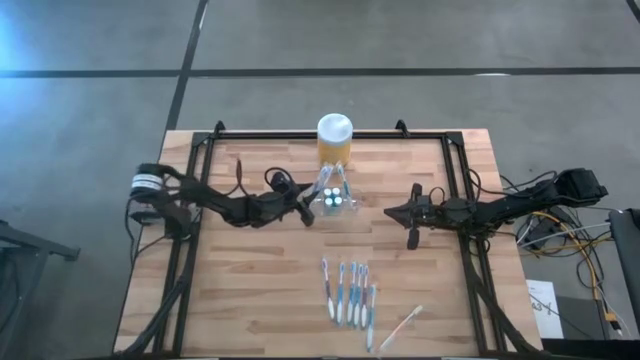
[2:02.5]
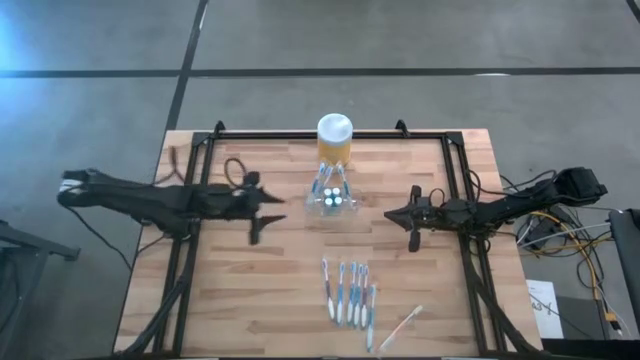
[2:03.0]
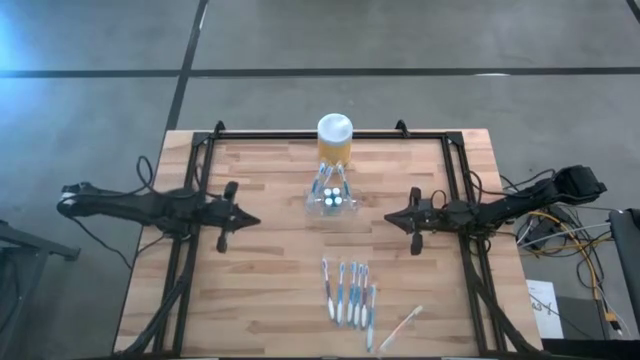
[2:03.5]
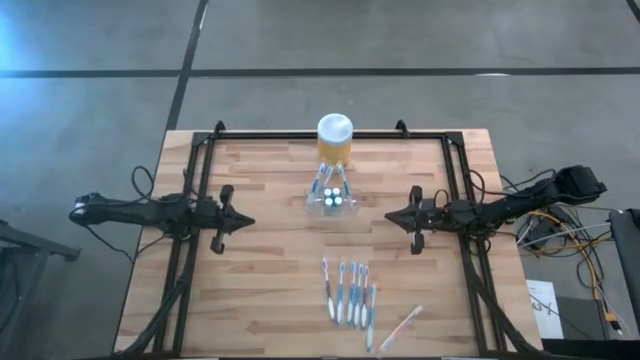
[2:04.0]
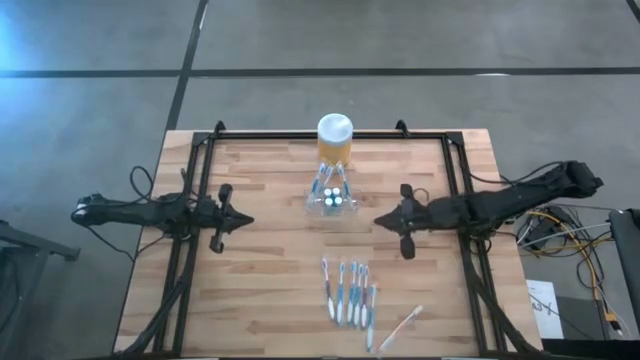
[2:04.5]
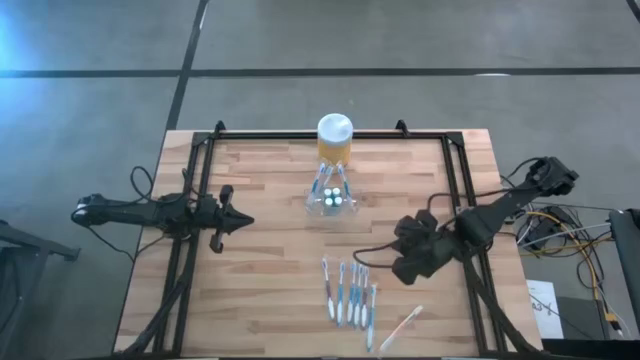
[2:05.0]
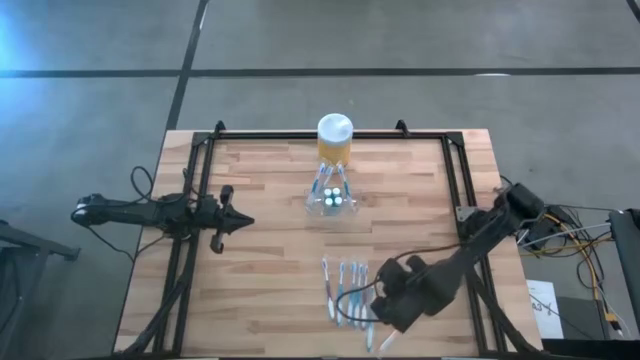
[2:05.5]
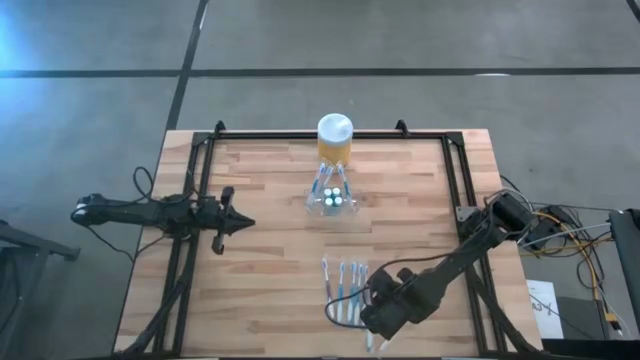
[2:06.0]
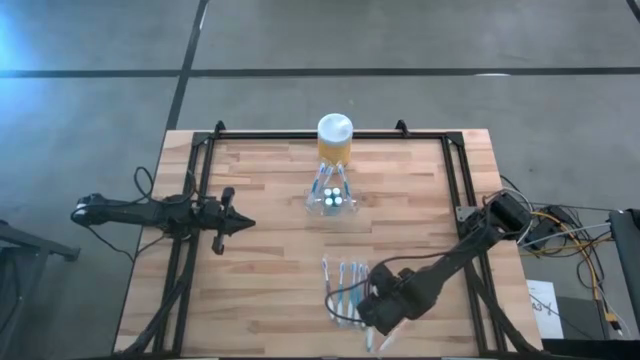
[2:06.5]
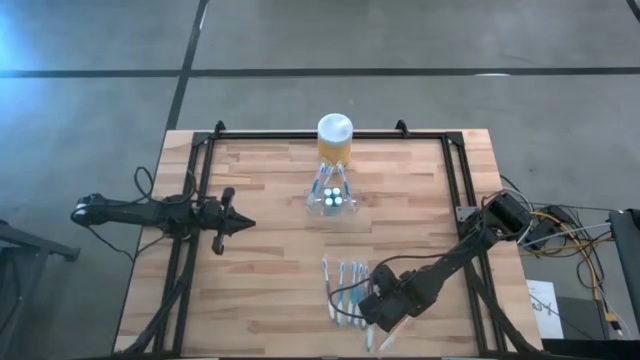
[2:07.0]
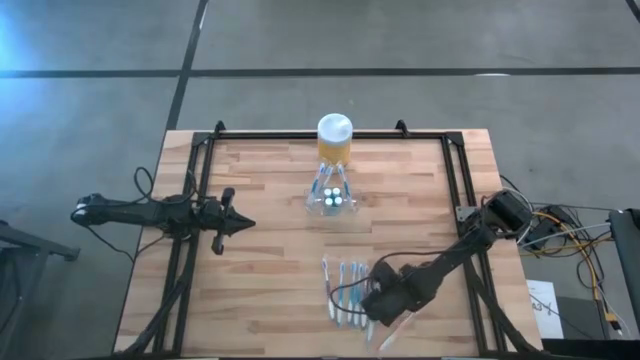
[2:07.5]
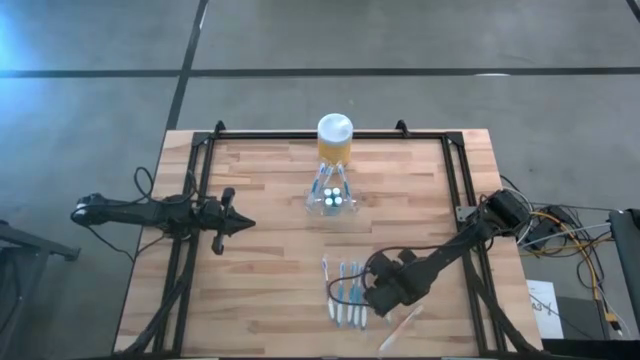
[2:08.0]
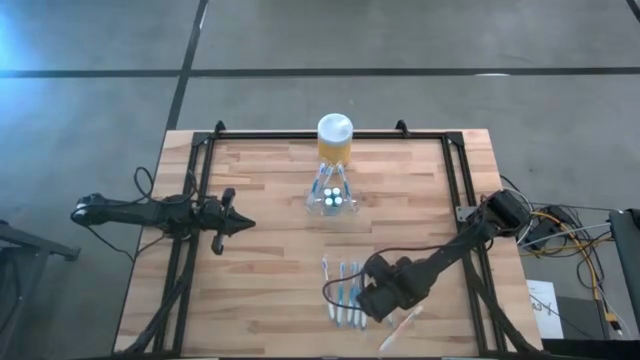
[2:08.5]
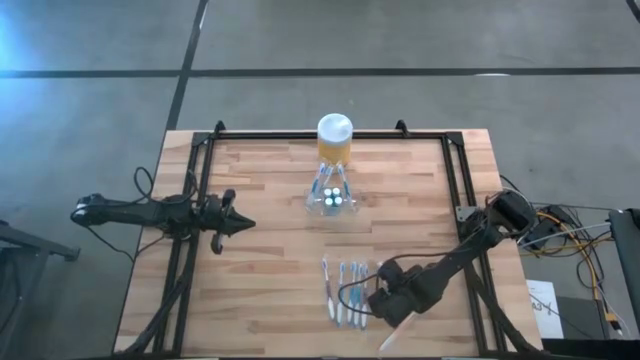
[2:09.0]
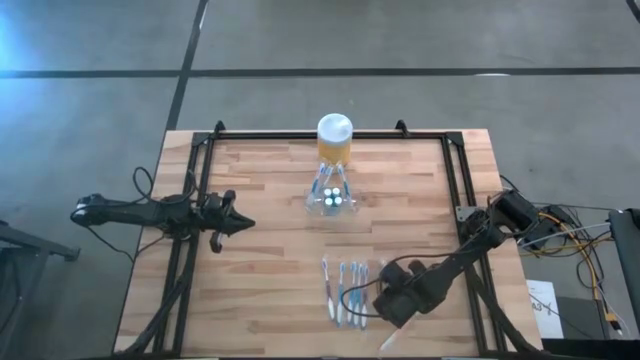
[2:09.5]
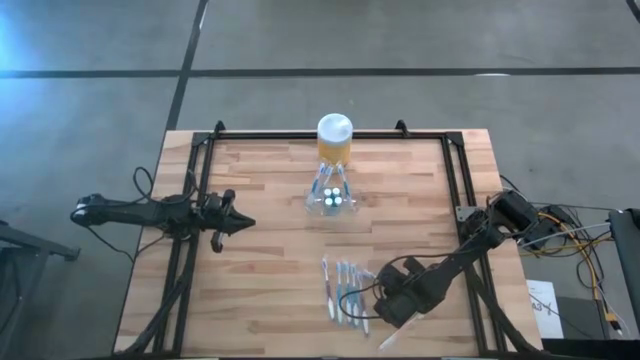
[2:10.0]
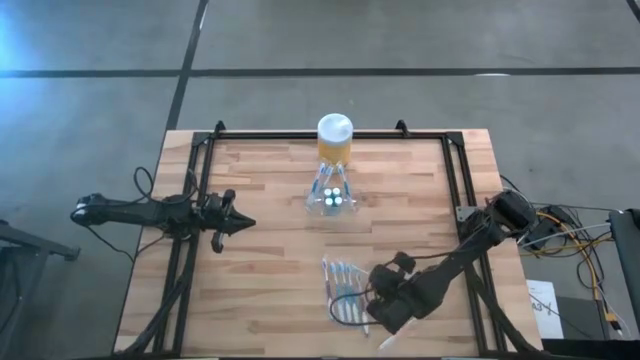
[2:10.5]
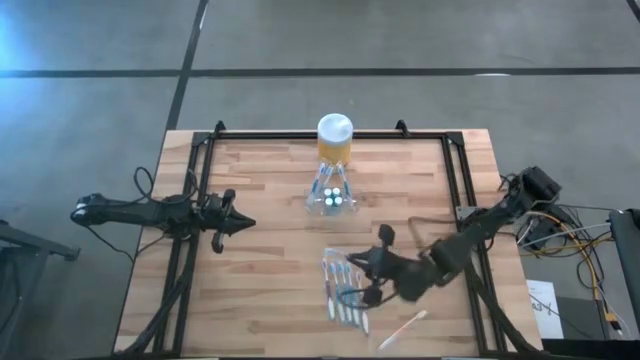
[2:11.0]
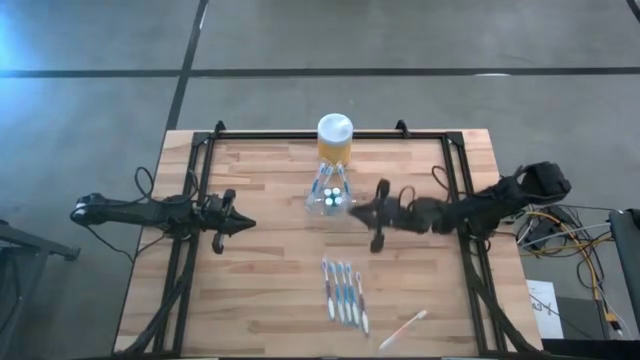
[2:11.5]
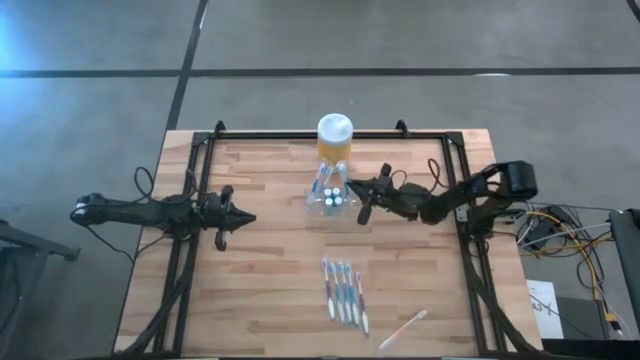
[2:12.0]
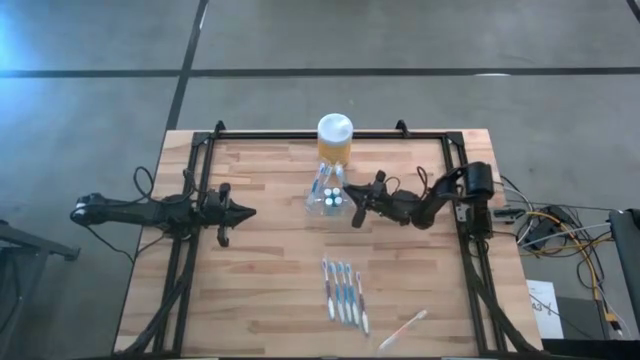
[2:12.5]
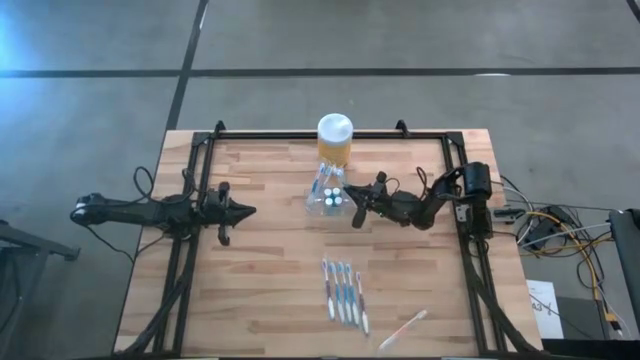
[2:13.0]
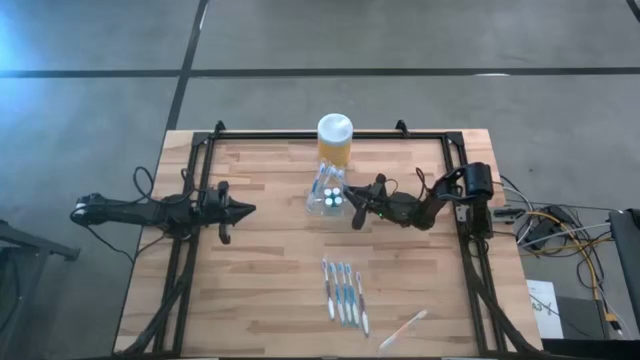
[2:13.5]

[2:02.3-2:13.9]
Task: Pick & Place toothbrushing station
Put the blue toothbrush into the right of the transparent organizer

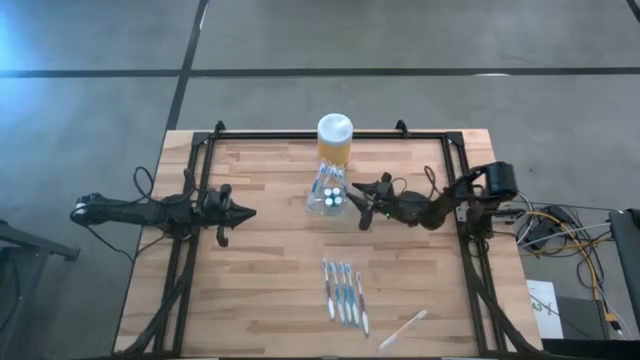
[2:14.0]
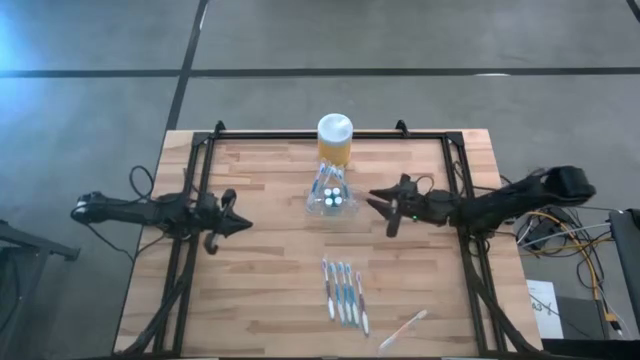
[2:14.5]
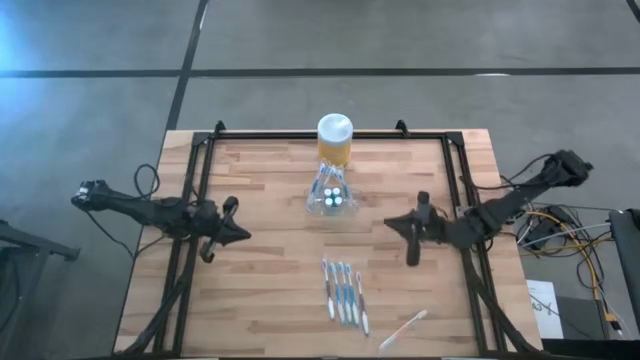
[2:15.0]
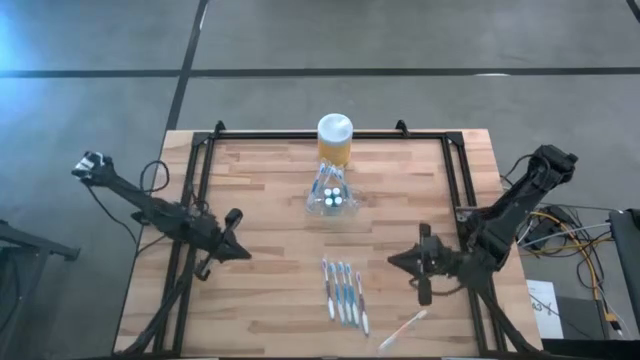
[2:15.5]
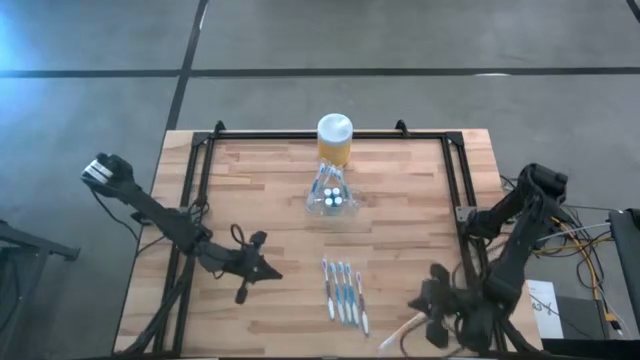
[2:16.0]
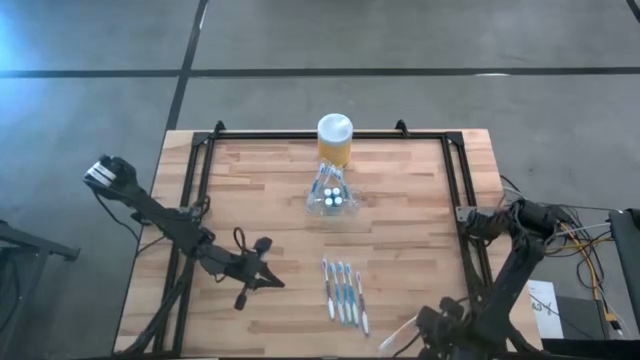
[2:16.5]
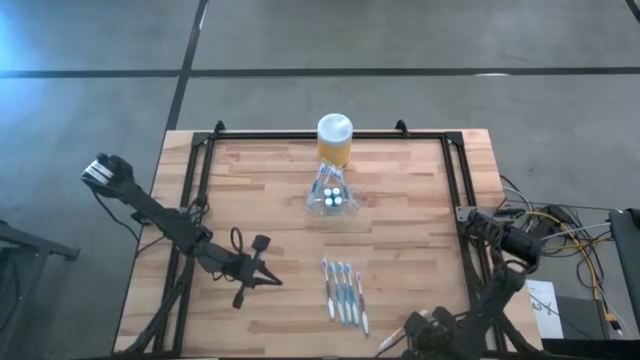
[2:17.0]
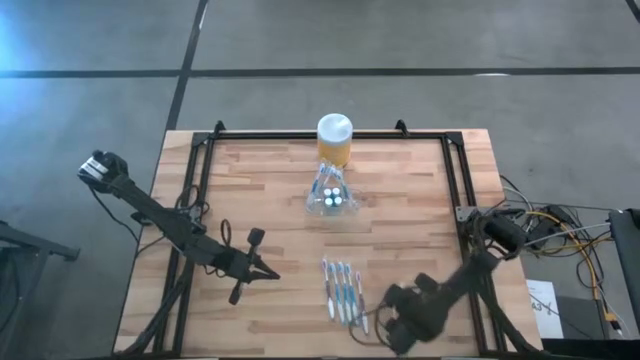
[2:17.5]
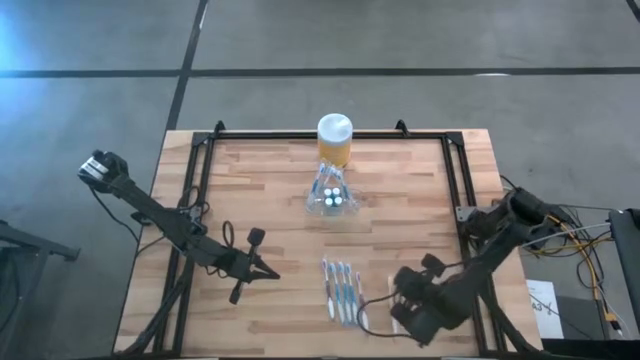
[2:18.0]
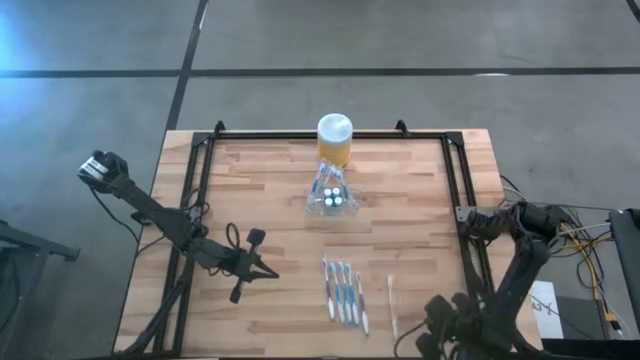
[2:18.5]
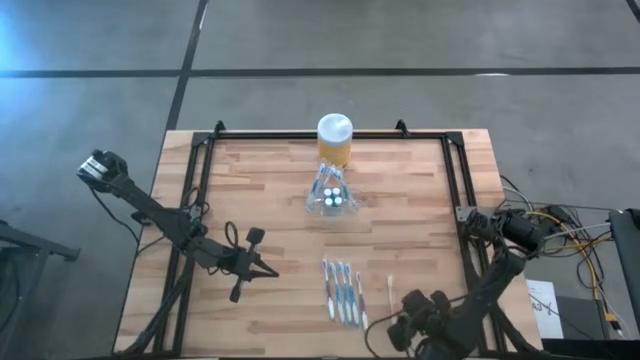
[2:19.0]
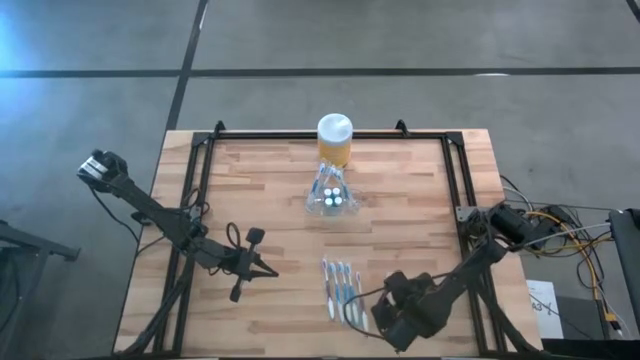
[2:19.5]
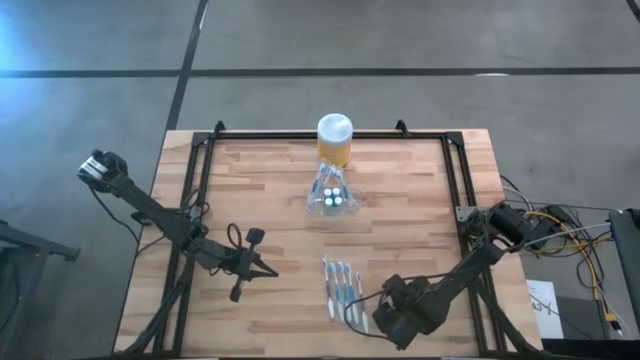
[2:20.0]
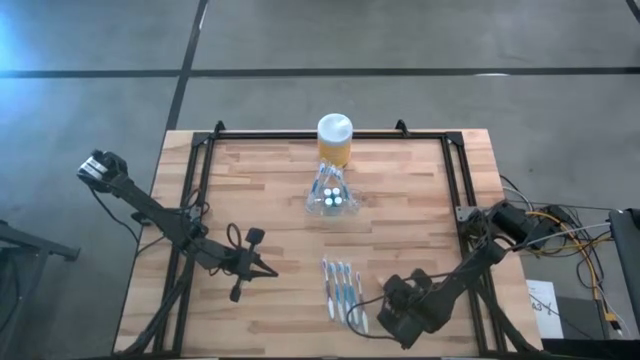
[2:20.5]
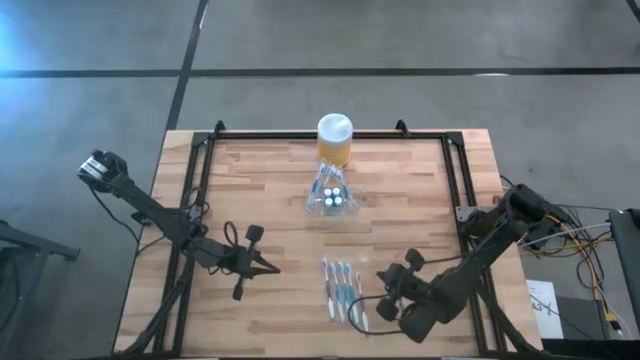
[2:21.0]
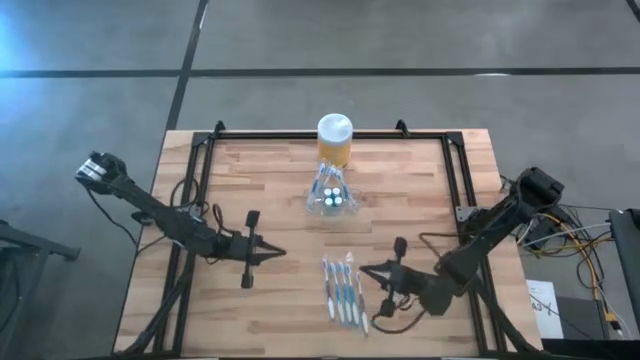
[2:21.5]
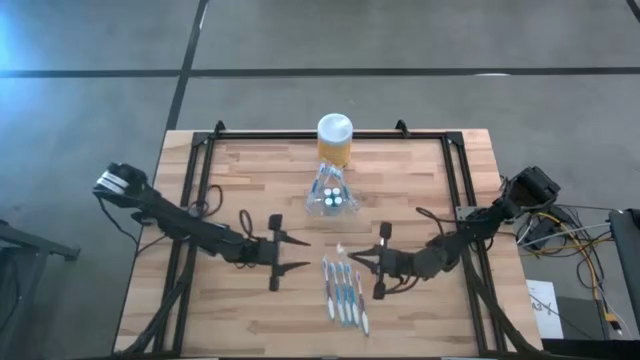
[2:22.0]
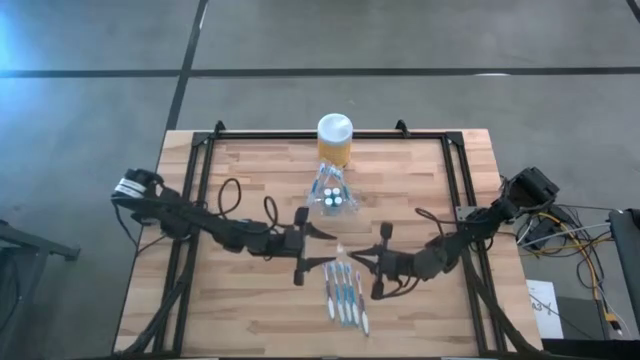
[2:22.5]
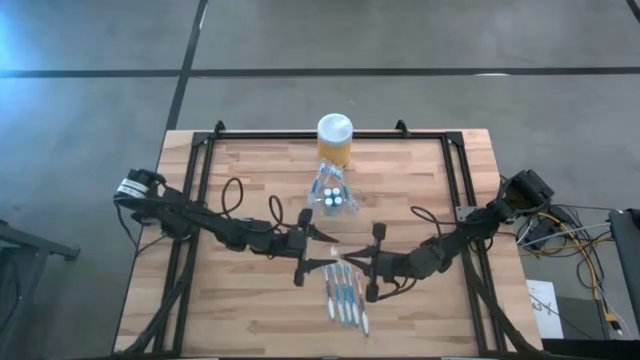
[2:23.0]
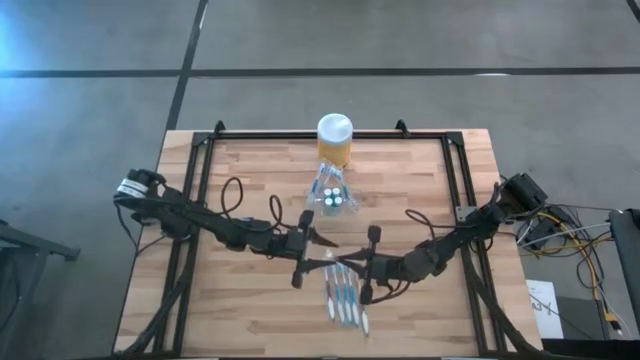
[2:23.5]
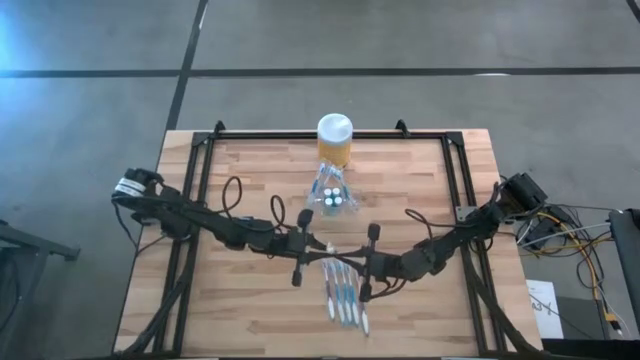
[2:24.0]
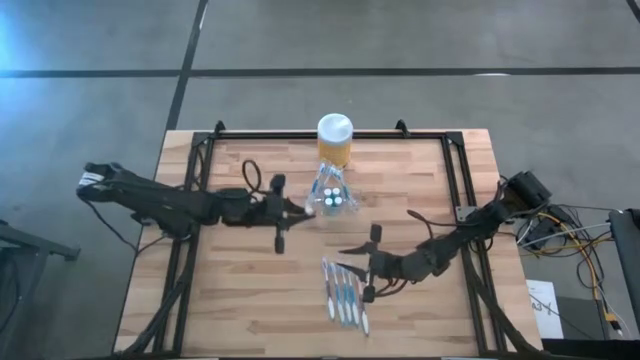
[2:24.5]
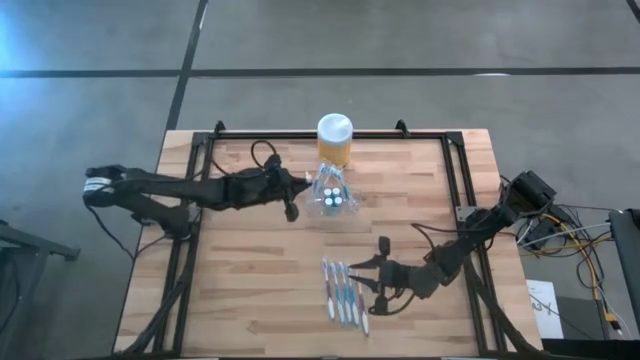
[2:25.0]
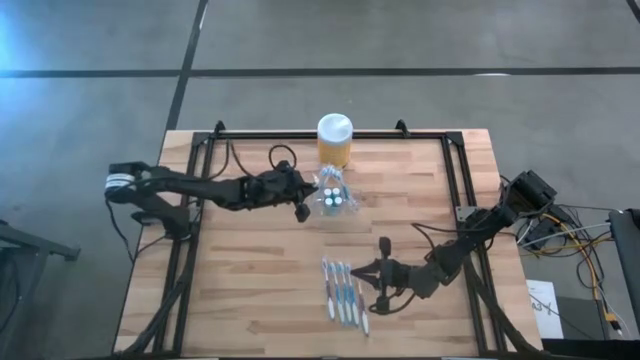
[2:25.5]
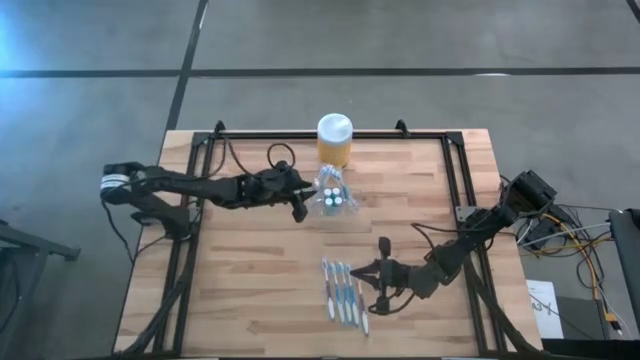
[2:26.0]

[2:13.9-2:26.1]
Put the orange toothbrush into the left of the transparent organizer
